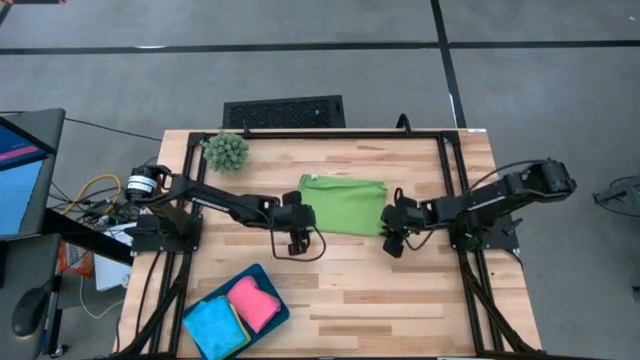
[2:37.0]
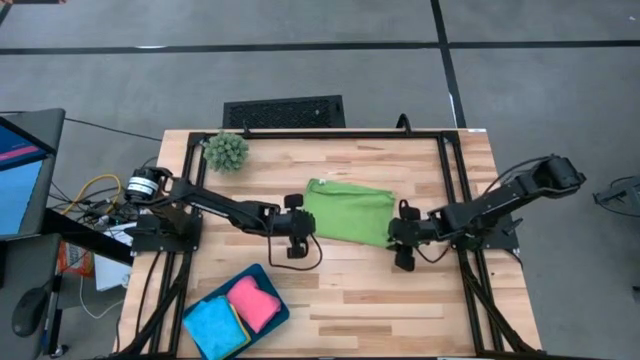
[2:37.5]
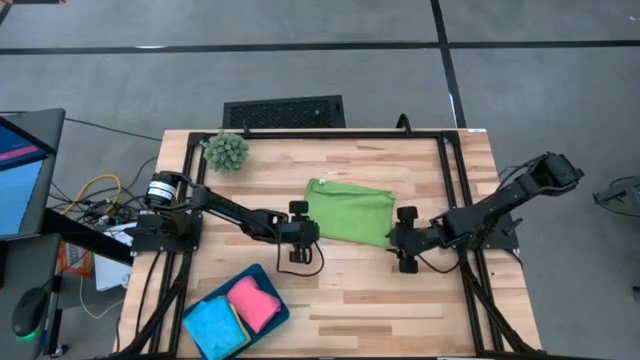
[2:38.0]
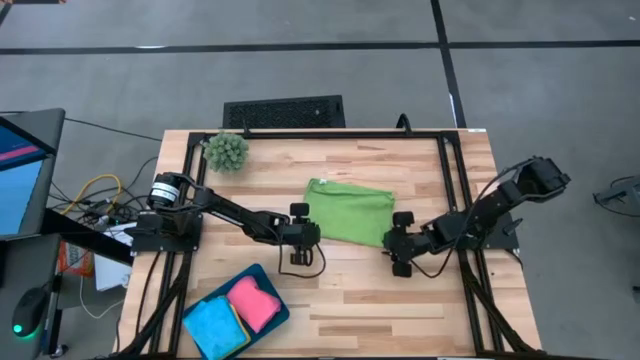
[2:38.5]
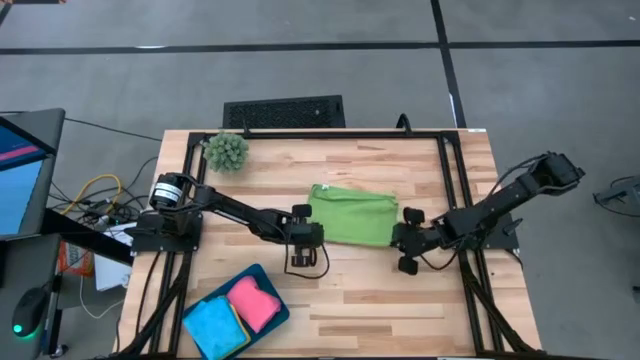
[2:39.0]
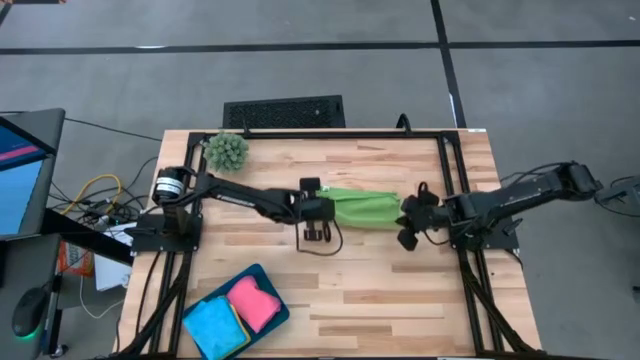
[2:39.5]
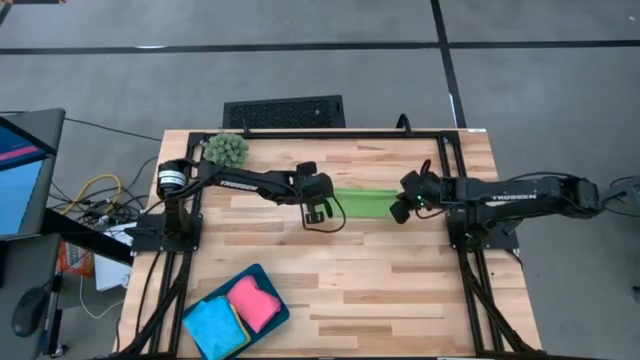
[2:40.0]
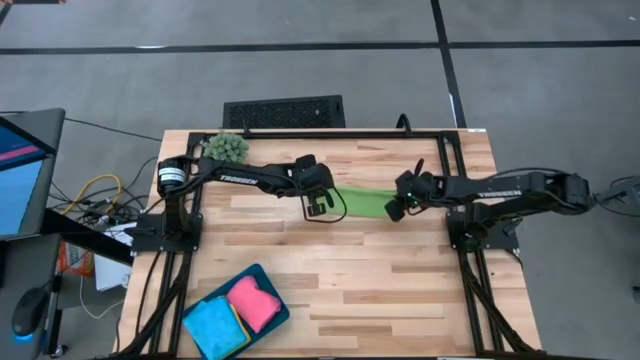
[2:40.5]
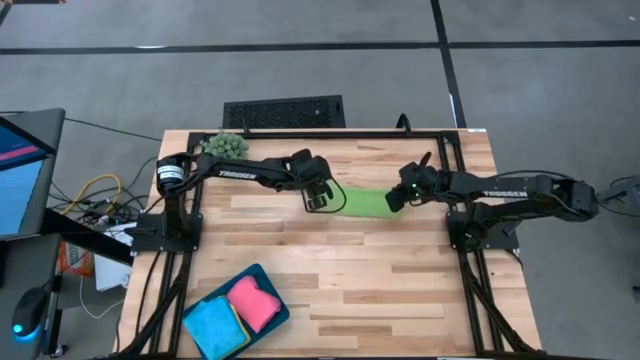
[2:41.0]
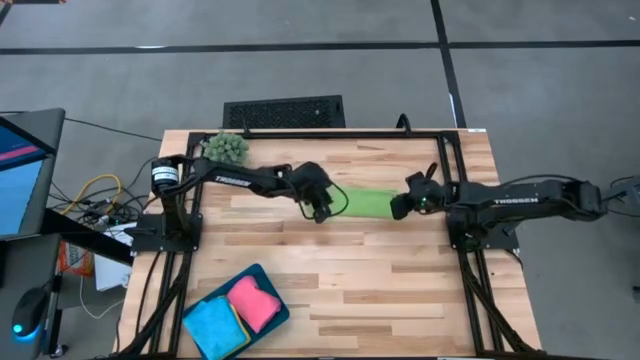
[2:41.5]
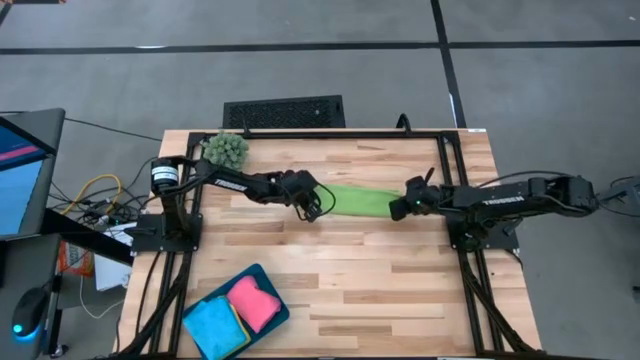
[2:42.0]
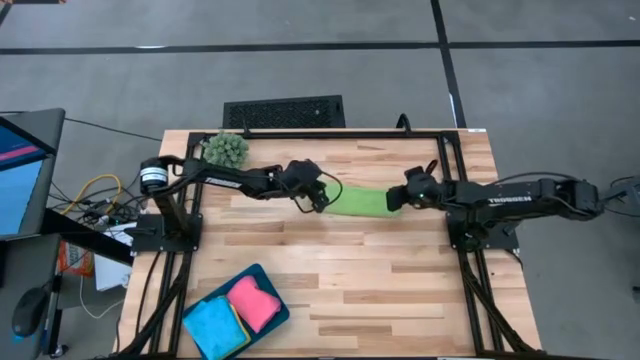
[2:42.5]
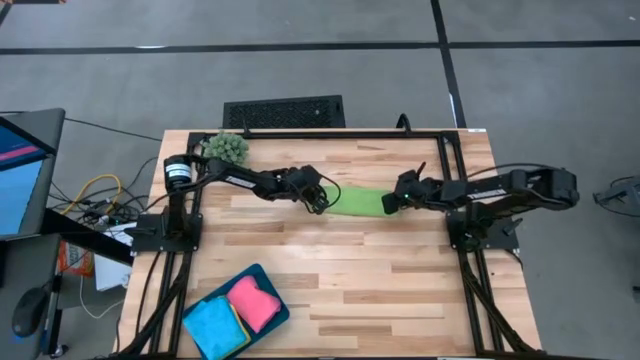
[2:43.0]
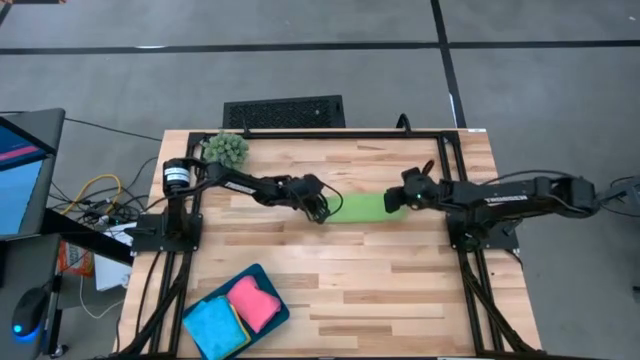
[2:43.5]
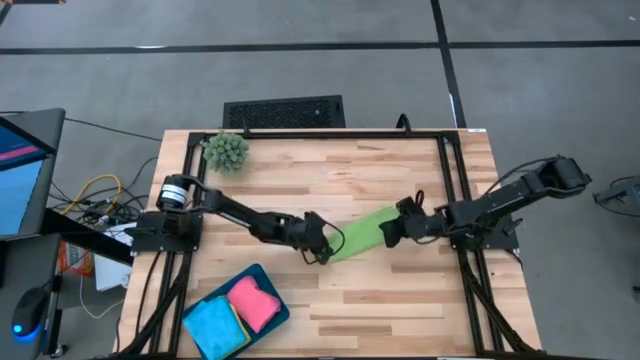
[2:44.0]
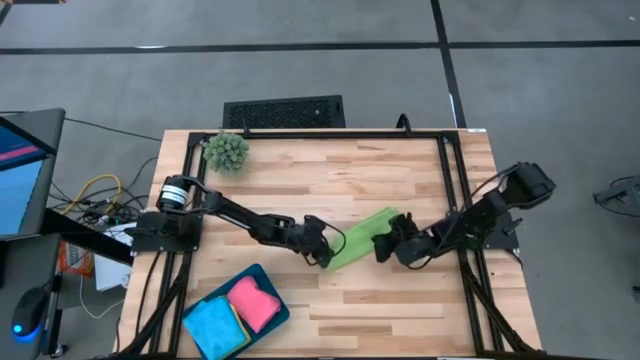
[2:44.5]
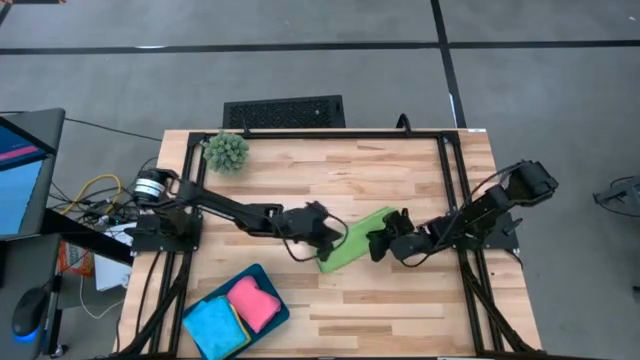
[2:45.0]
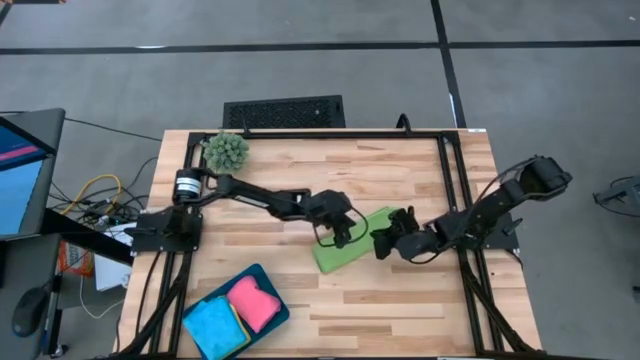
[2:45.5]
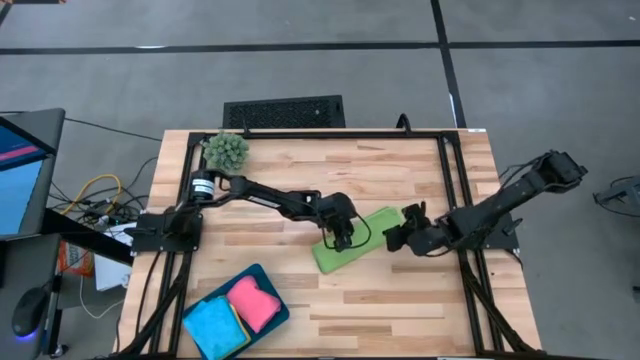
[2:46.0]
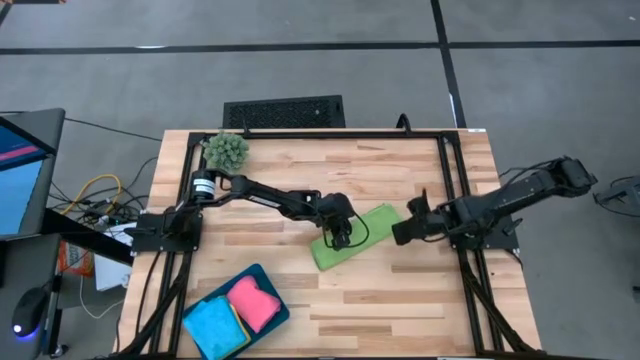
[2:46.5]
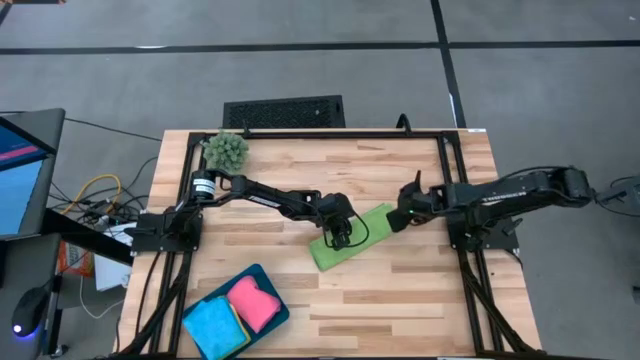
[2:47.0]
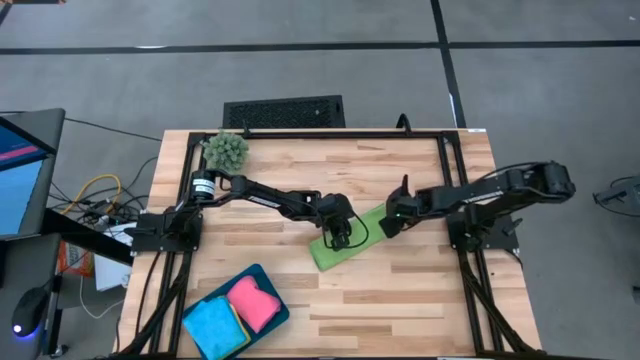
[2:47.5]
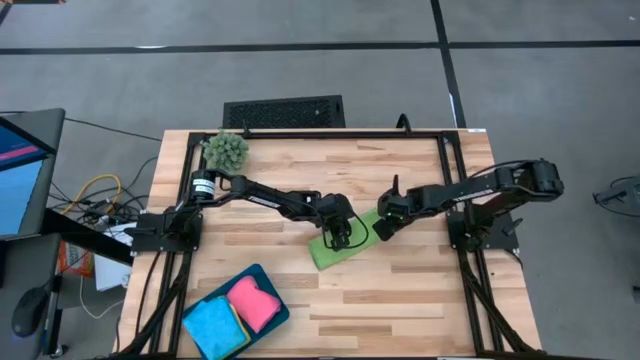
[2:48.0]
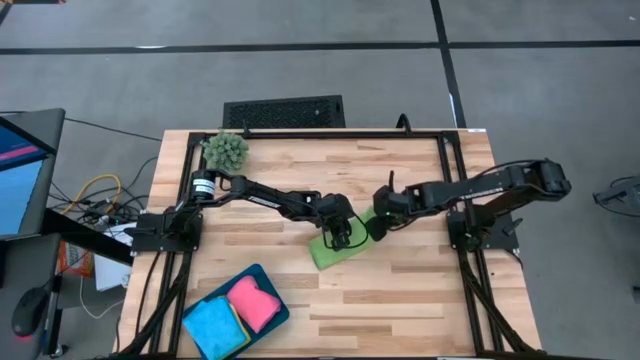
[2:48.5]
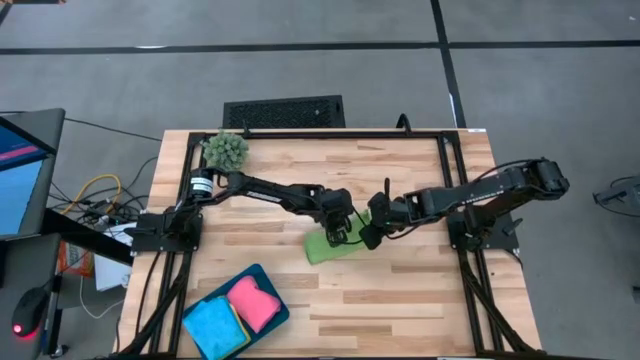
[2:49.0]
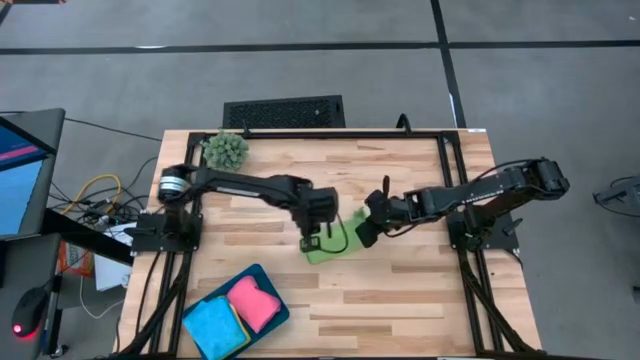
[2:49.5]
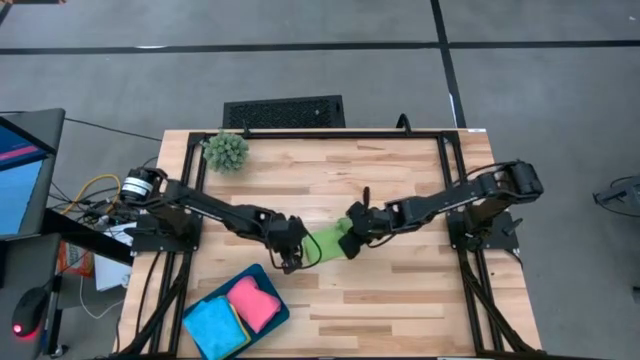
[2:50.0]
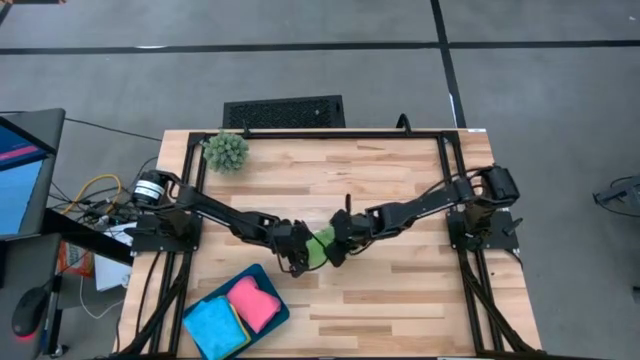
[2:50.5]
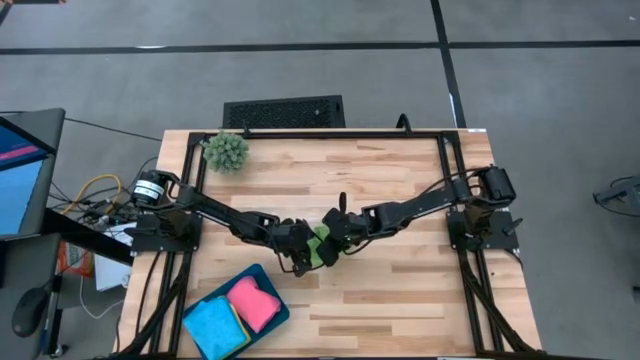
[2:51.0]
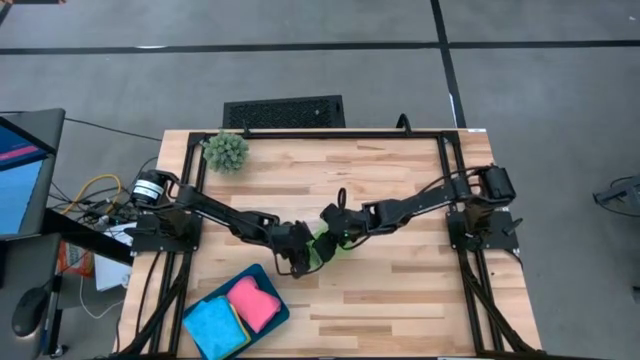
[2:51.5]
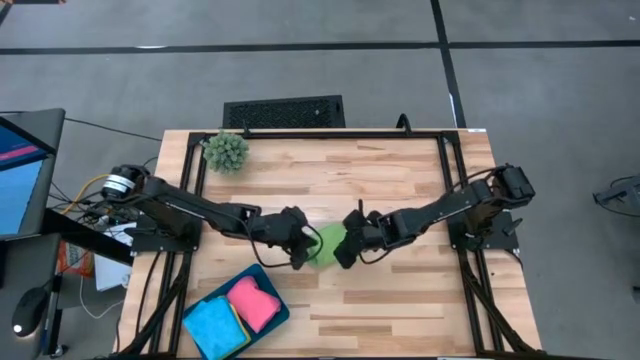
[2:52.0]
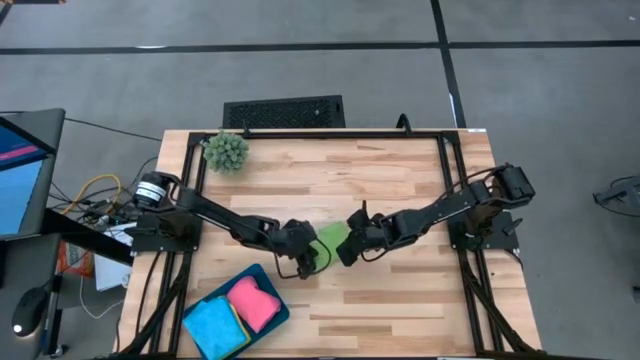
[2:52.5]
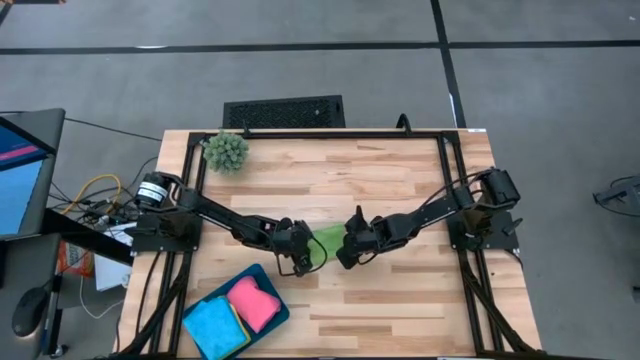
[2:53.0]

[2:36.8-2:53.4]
Task: Fold microfiber towels
Fold the green microfiber towel

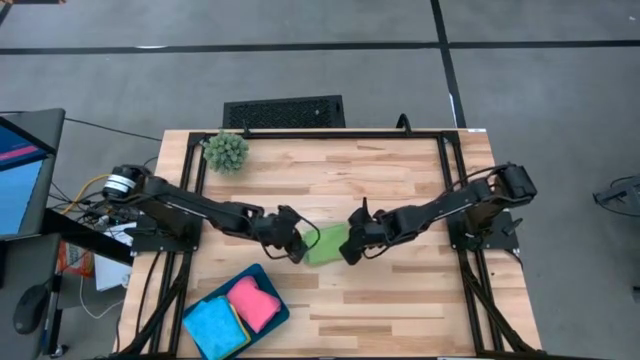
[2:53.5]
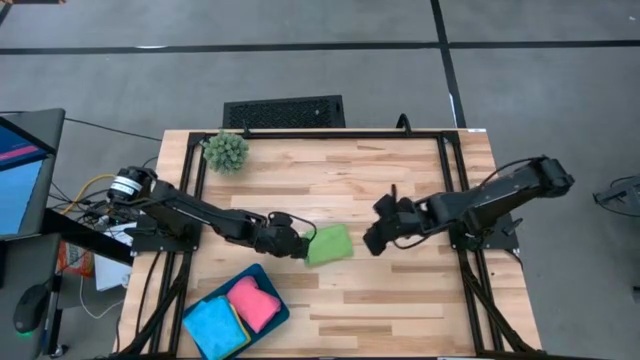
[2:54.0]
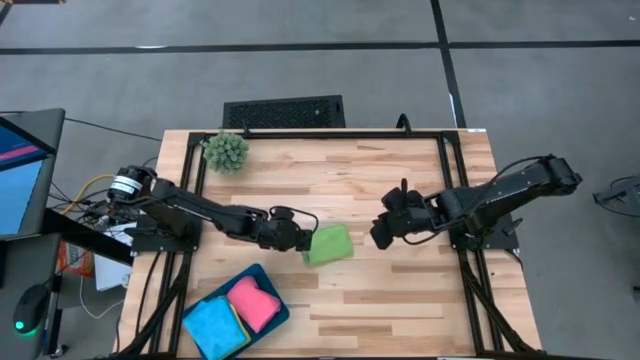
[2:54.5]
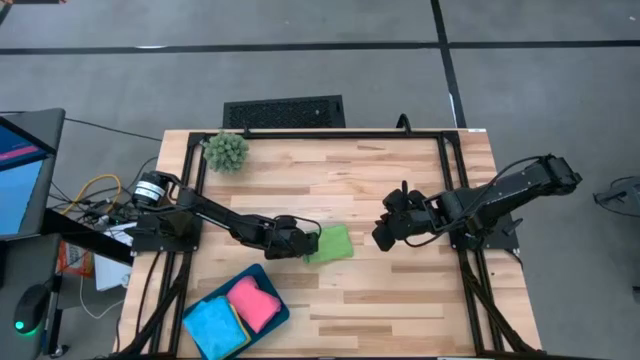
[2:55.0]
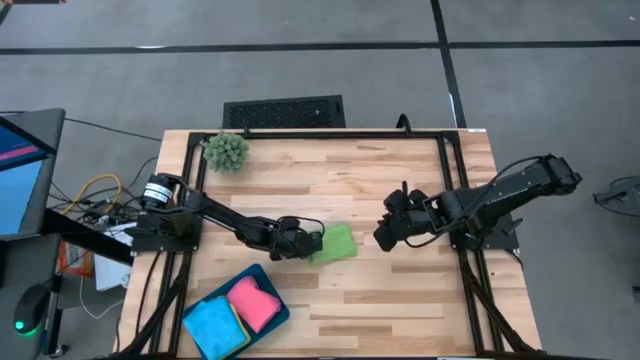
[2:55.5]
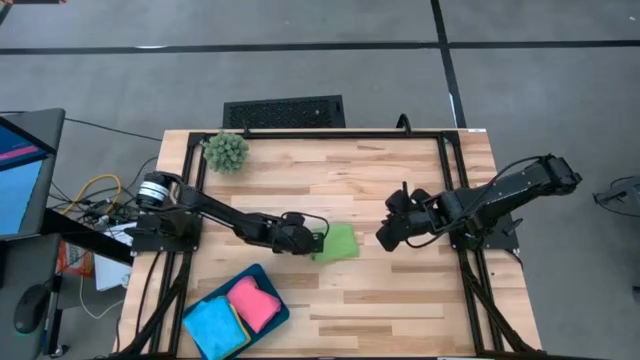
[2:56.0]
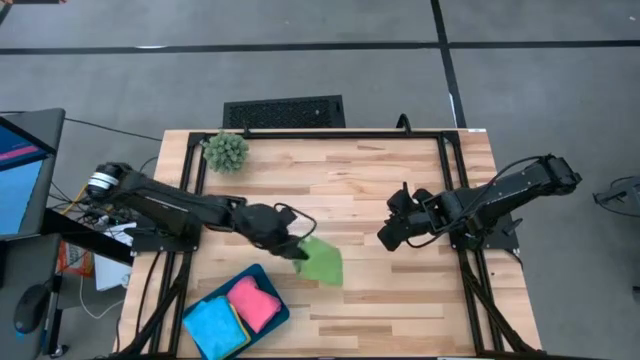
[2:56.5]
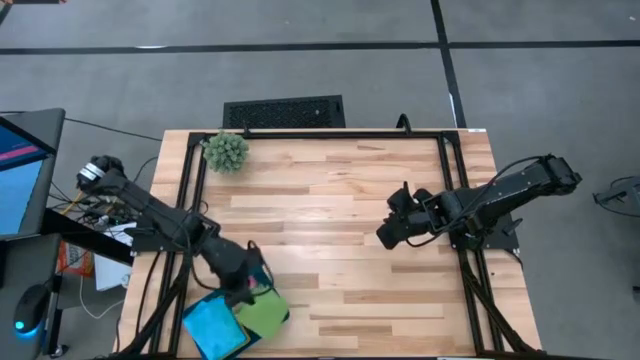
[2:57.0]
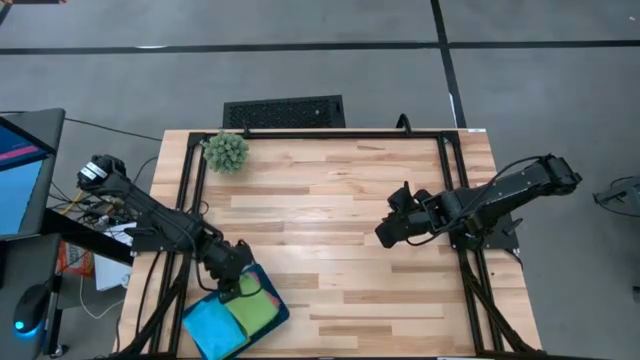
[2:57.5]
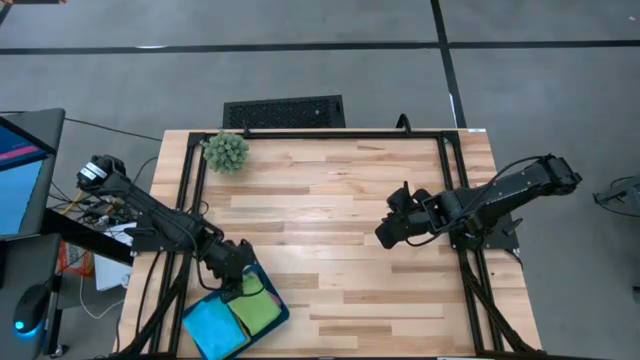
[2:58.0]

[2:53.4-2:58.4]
Put the green microfiber towel into the bin
